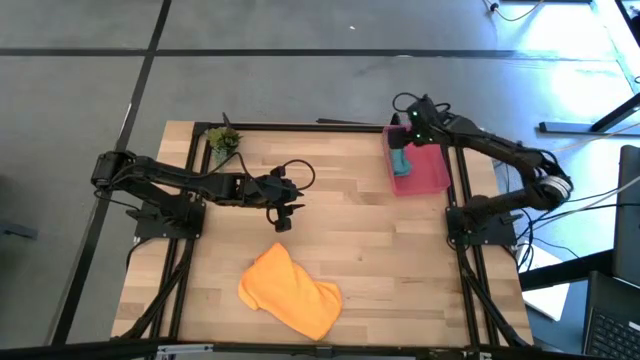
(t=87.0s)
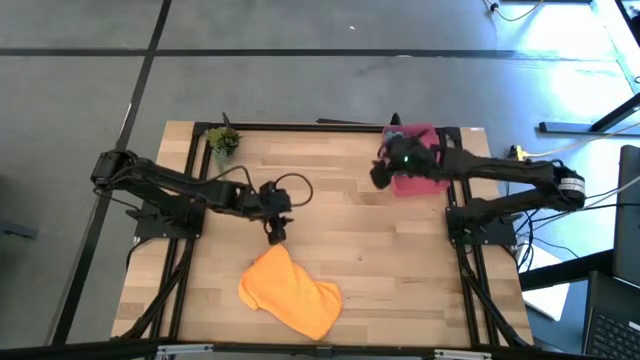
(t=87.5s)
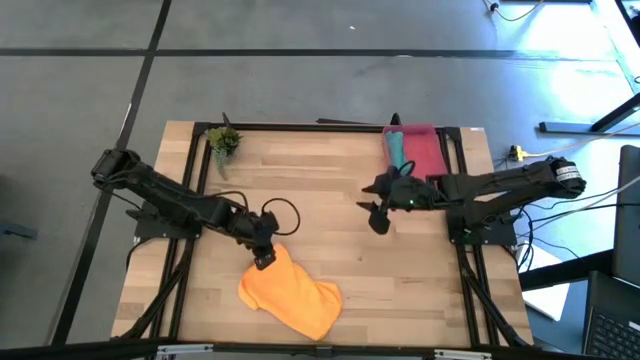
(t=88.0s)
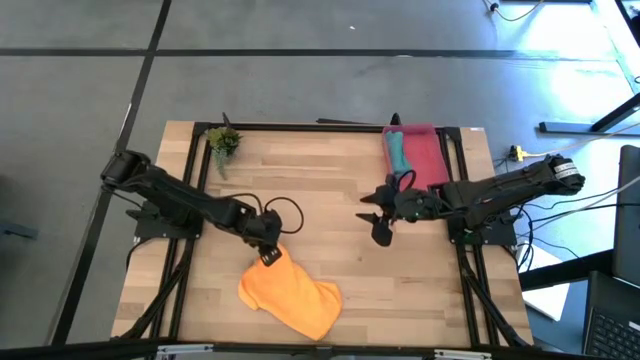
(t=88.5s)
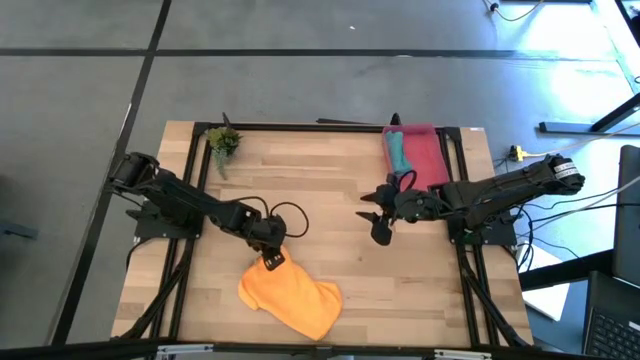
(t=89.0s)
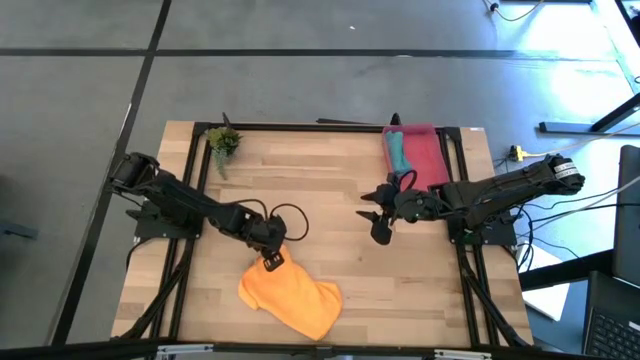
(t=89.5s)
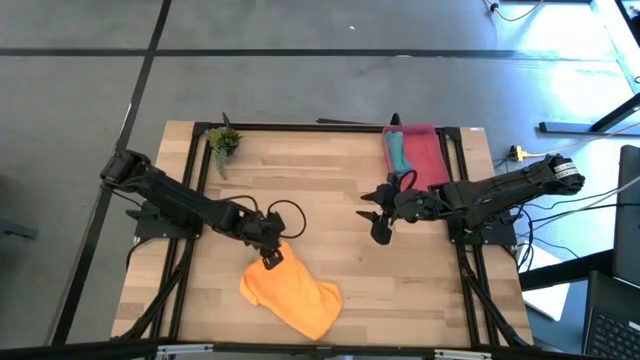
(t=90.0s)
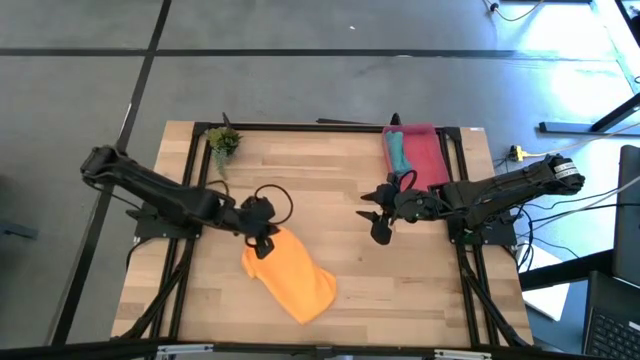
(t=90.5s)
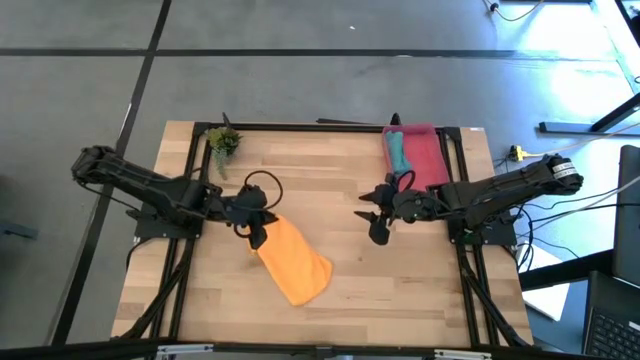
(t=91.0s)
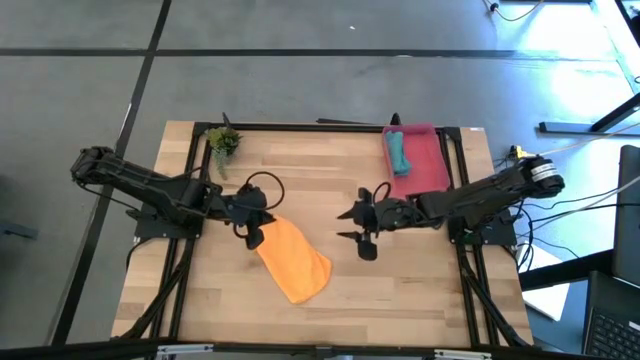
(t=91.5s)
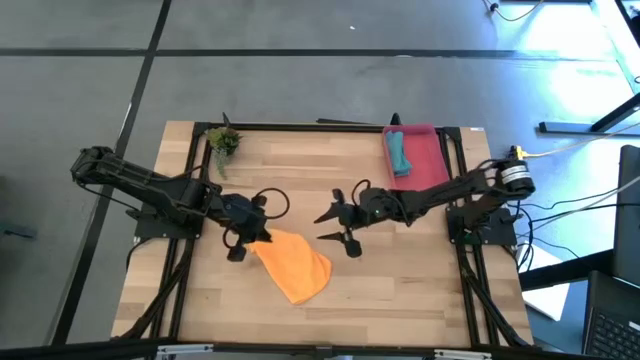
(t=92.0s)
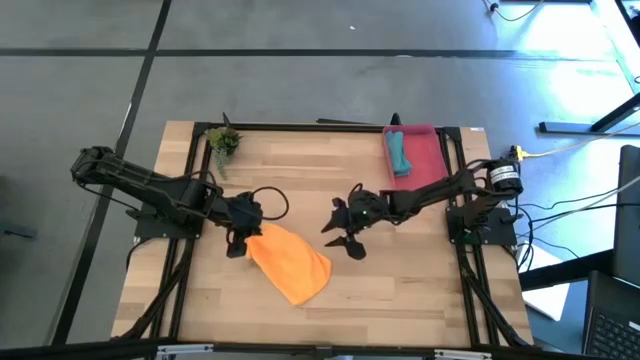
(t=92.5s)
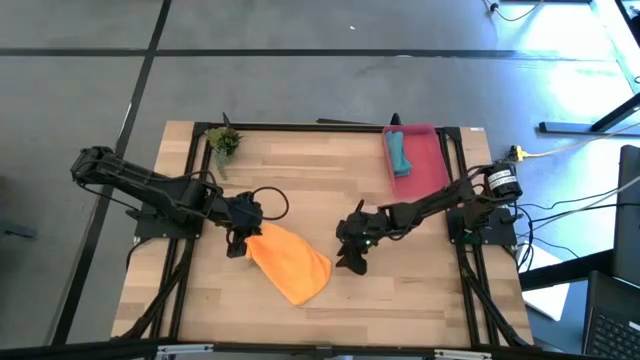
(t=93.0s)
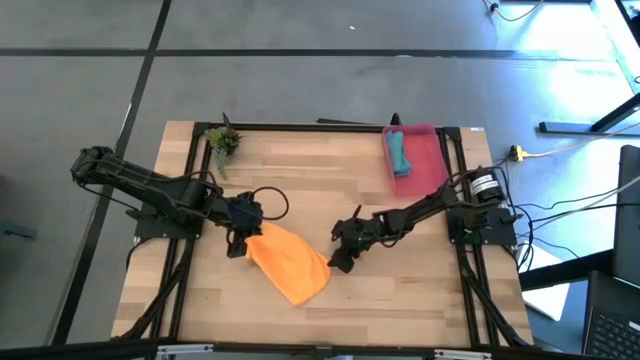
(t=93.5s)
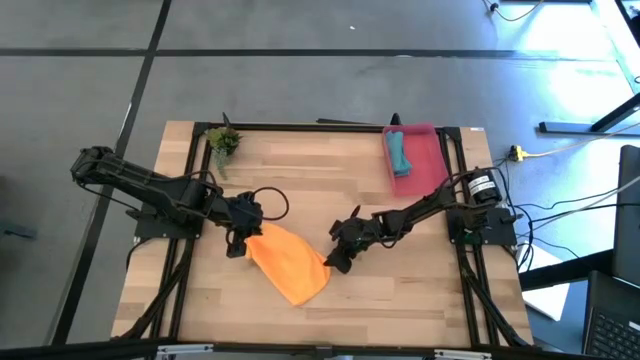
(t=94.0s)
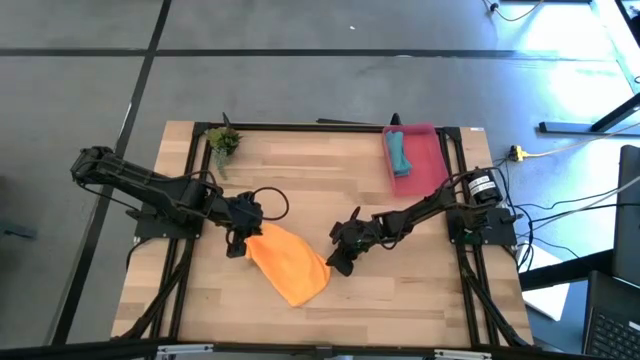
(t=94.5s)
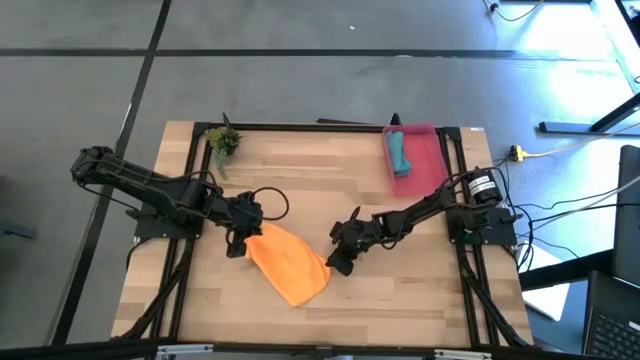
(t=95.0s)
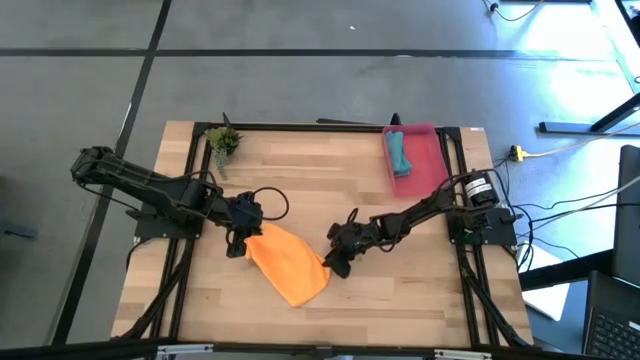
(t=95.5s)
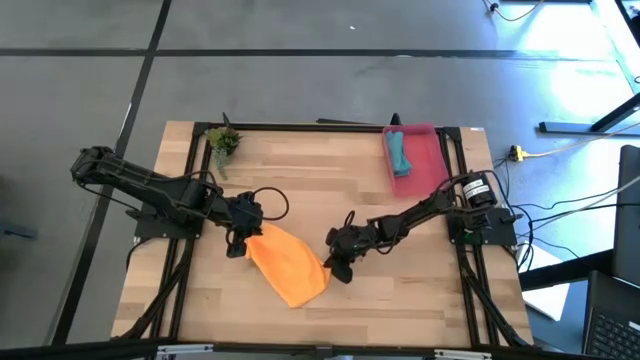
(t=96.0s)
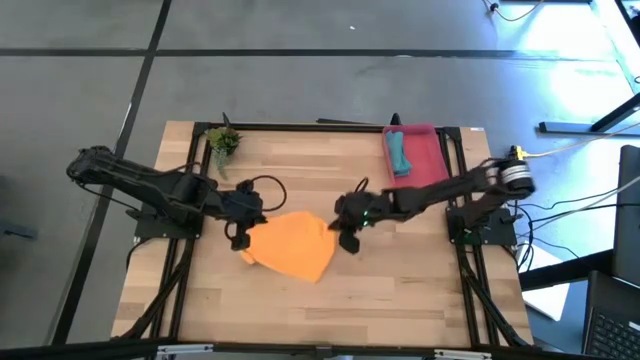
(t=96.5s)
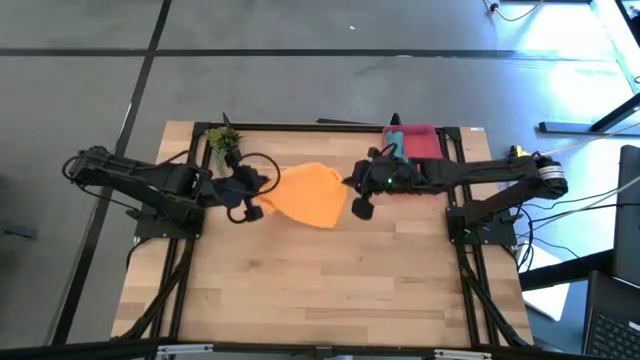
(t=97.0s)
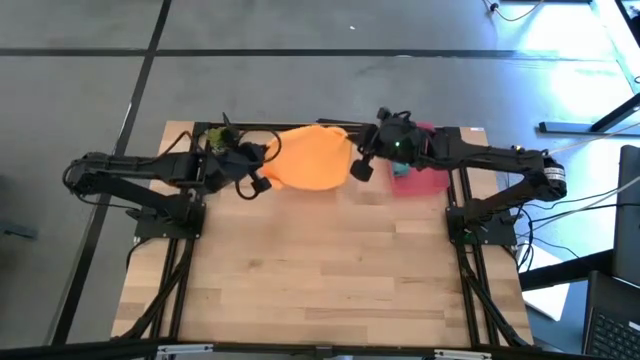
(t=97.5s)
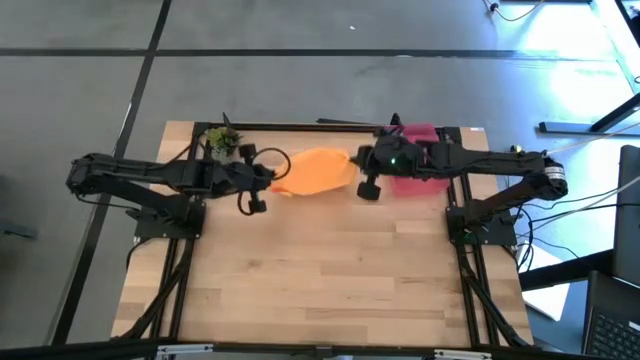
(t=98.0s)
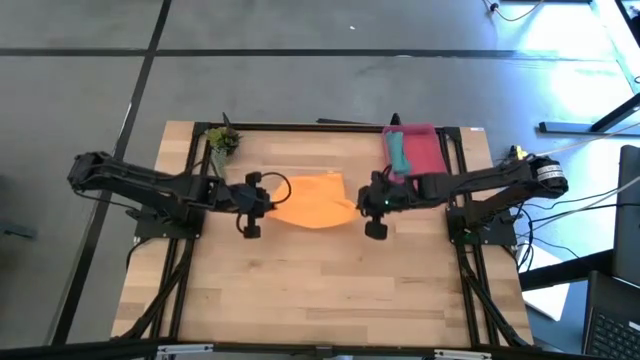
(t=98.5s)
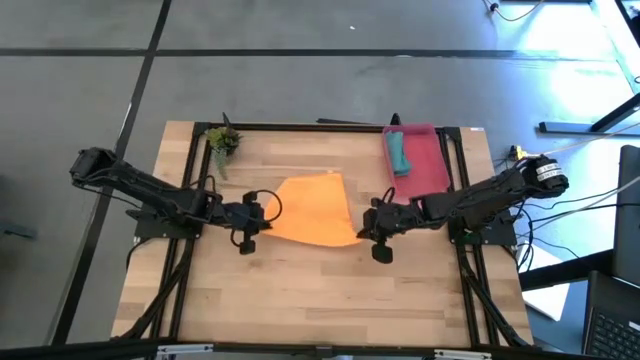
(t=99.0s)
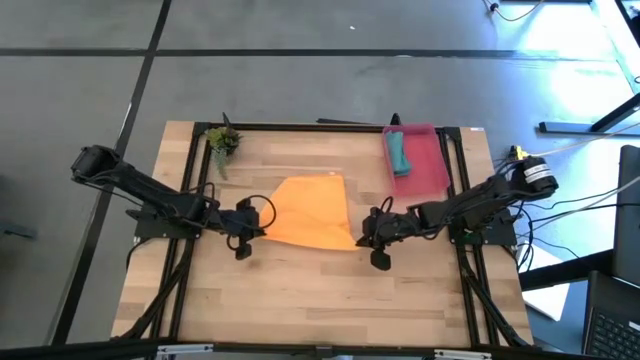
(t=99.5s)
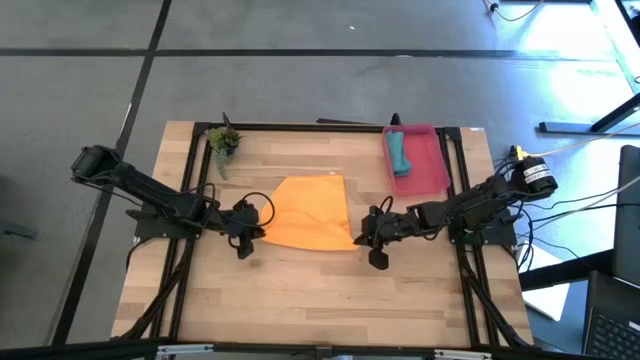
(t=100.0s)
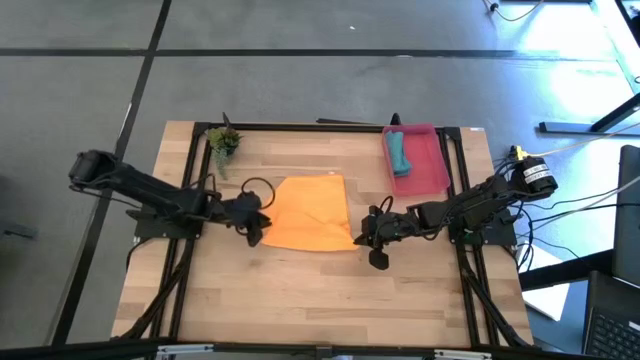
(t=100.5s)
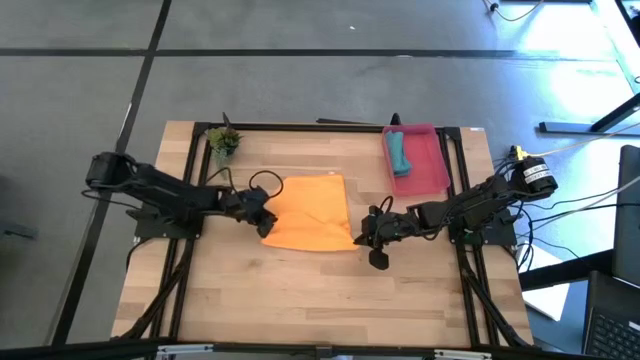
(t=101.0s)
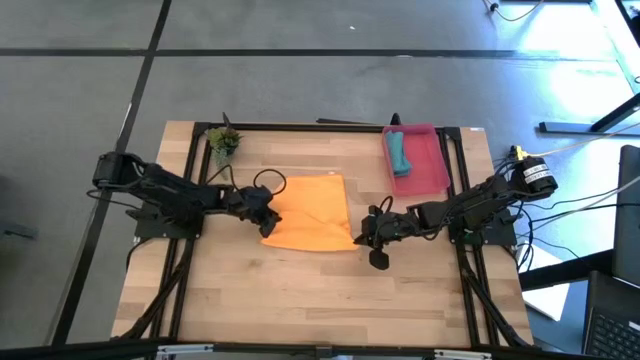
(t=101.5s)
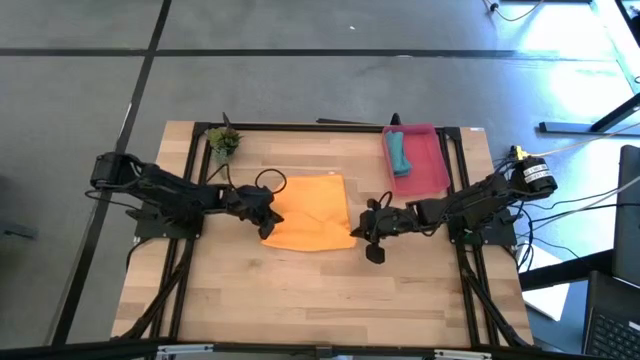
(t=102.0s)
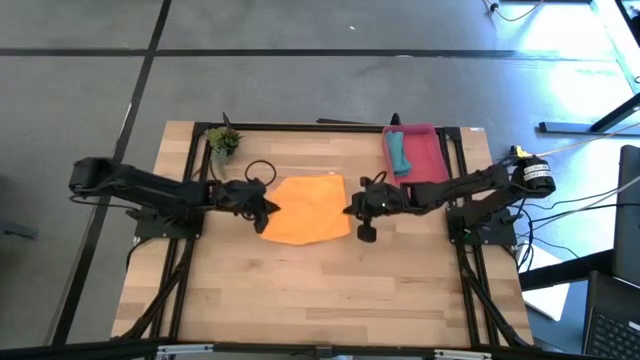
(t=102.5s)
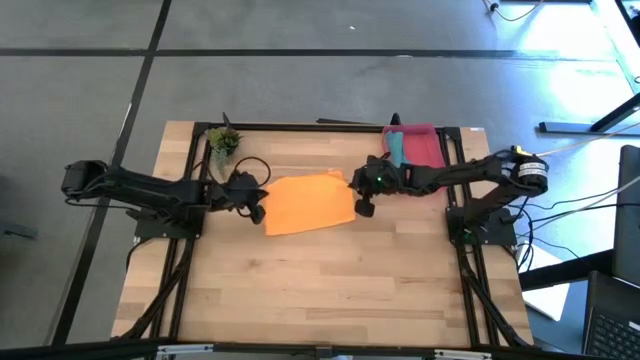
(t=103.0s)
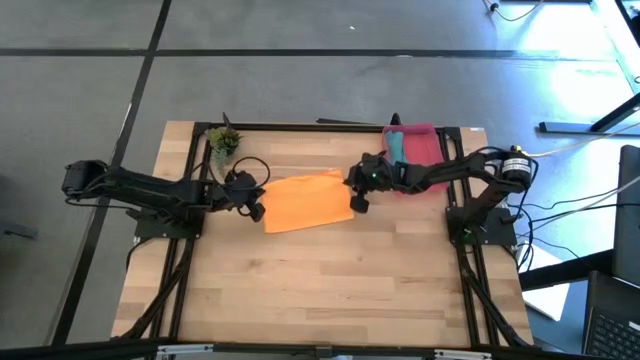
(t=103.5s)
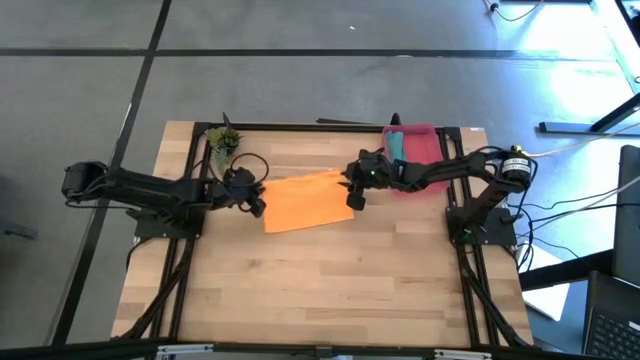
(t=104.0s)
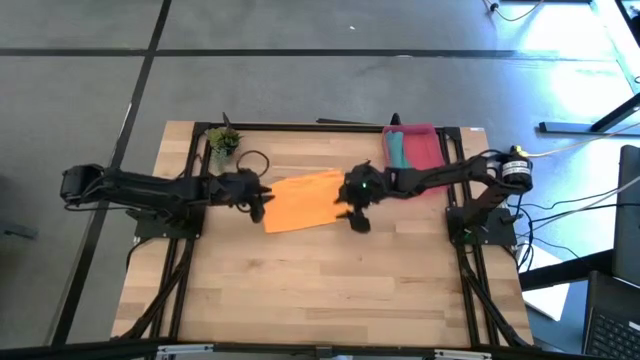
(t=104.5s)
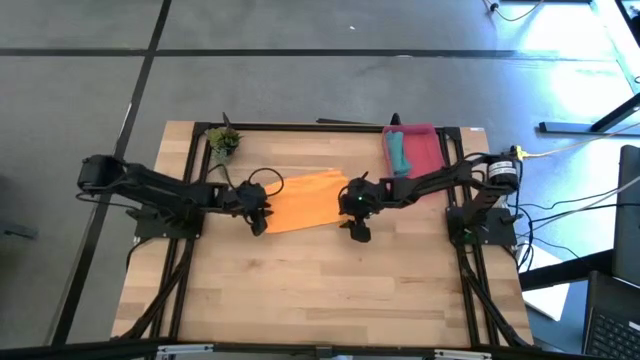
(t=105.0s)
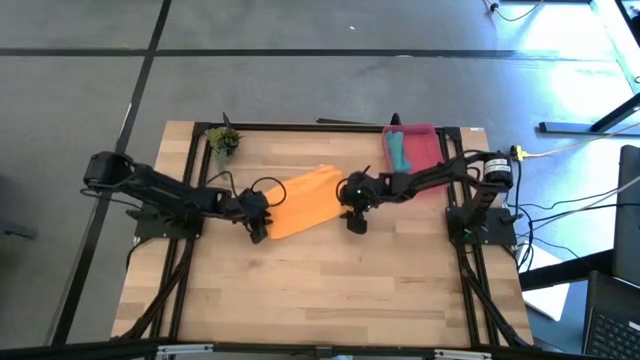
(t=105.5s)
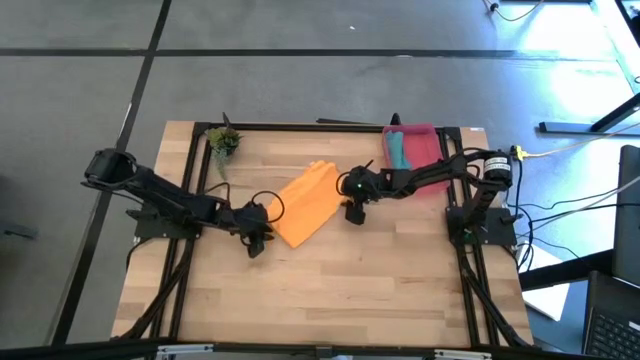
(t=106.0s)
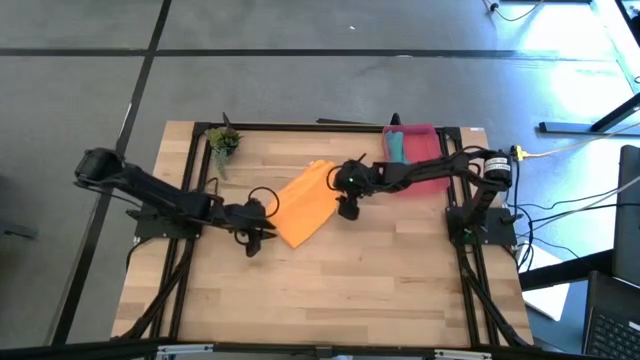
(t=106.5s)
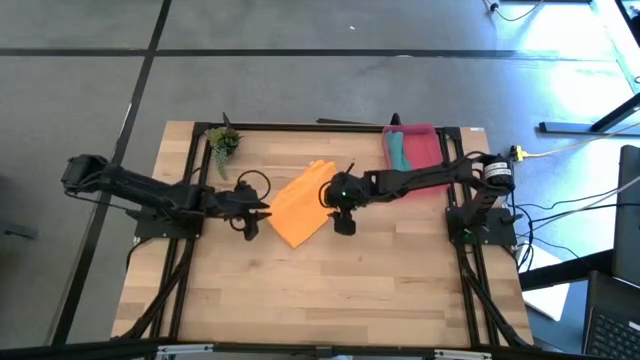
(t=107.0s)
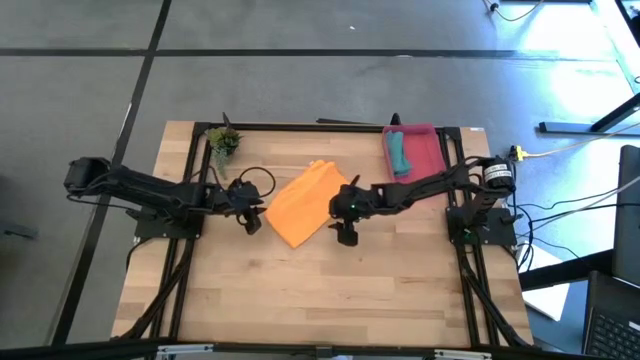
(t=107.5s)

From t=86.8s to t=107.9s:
Task: Roll microfiber towels into tight, uniform cylinder then place into a basket
Roll the yellow microfiber cloth on the table

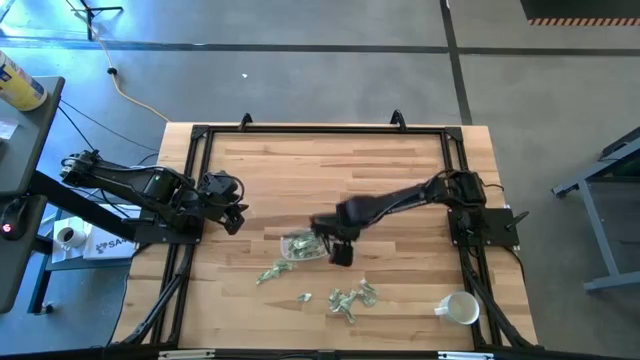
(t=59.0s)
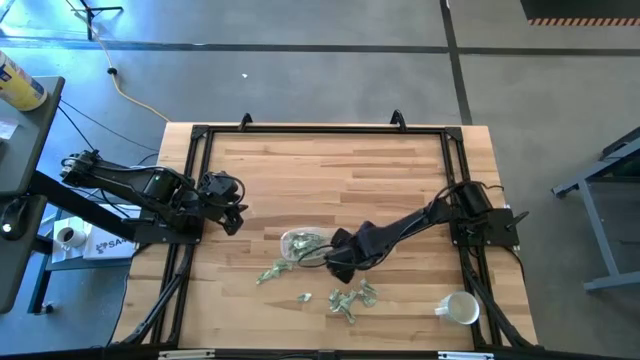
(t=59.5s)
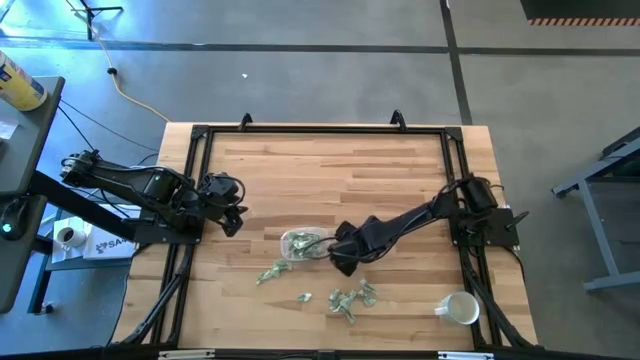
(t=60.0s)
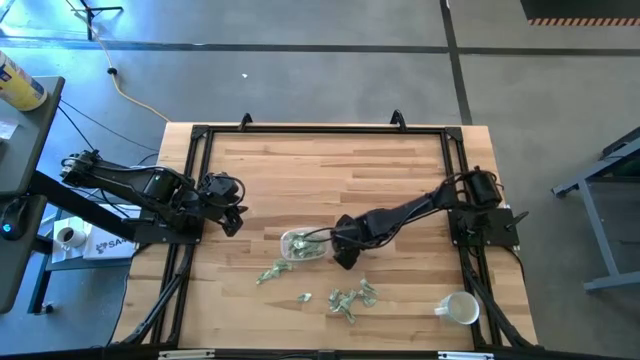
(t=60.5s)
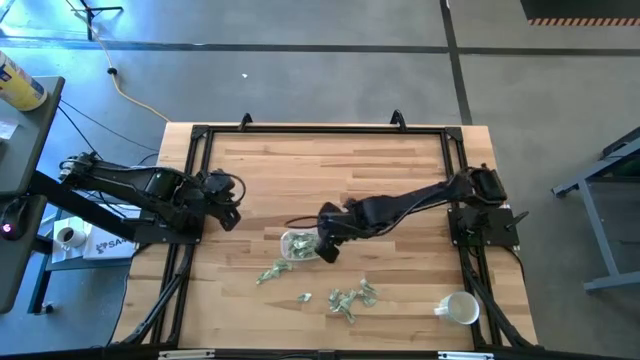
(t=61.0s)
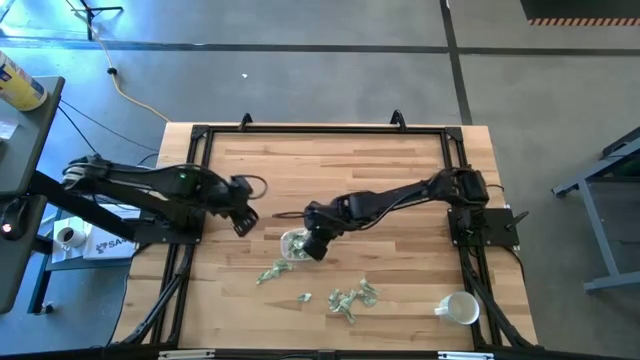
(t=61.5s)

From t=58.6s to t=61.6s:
Task: Pick and place Stevia / Truvia into bins
Put the green stevia packet into the transparent bin
